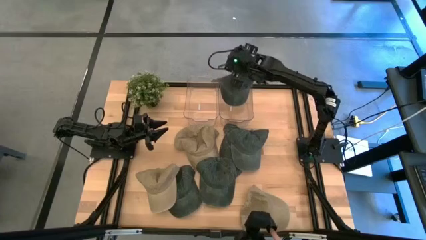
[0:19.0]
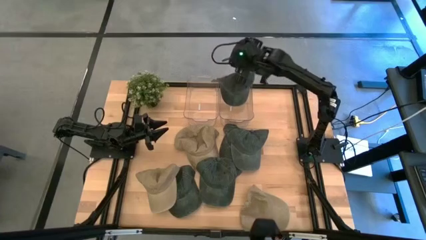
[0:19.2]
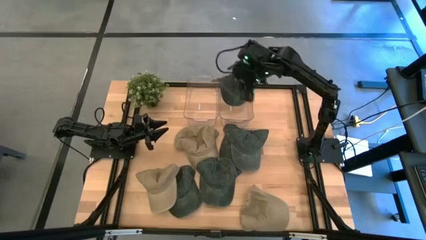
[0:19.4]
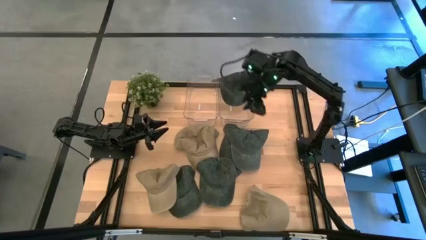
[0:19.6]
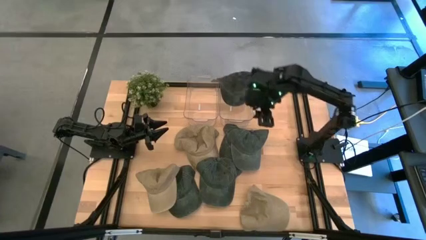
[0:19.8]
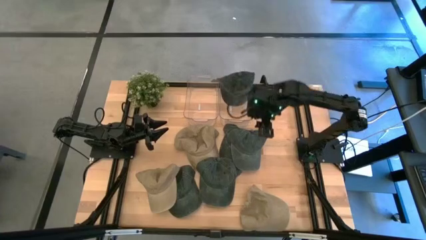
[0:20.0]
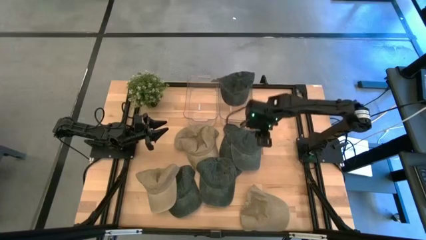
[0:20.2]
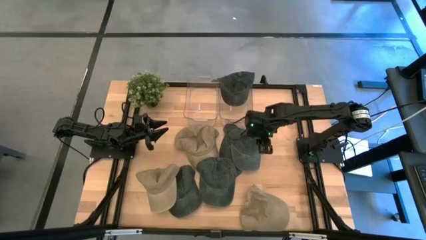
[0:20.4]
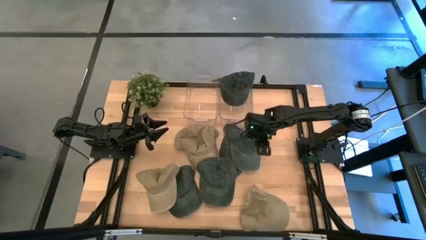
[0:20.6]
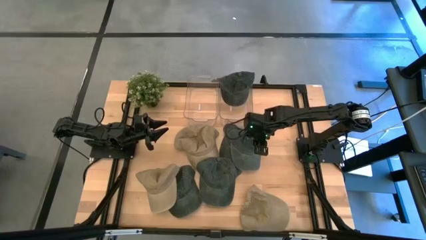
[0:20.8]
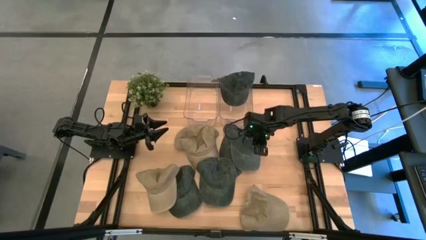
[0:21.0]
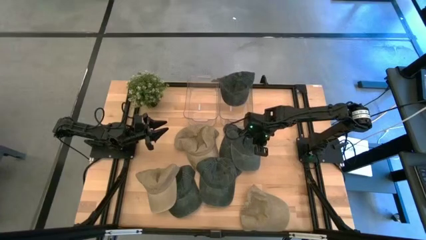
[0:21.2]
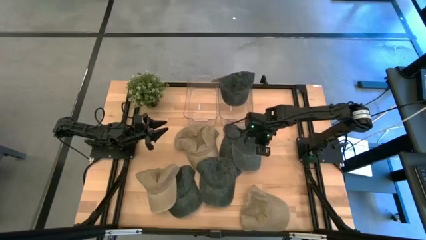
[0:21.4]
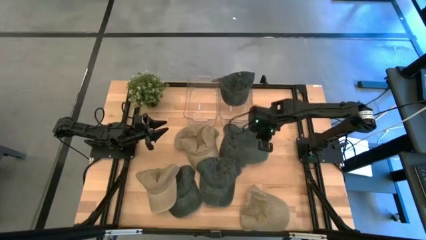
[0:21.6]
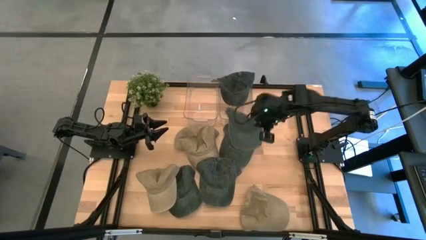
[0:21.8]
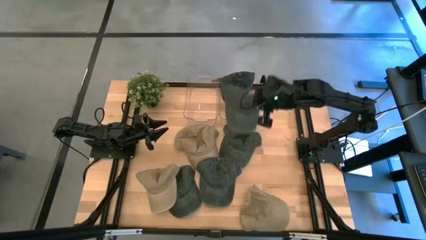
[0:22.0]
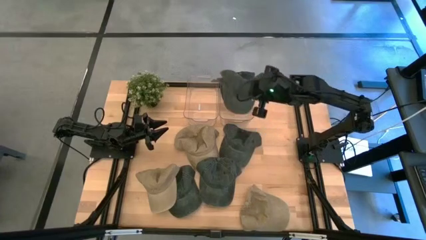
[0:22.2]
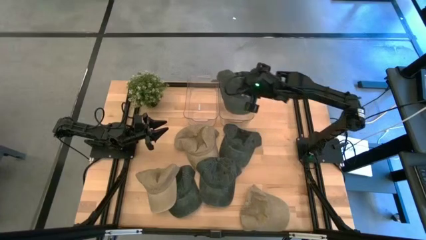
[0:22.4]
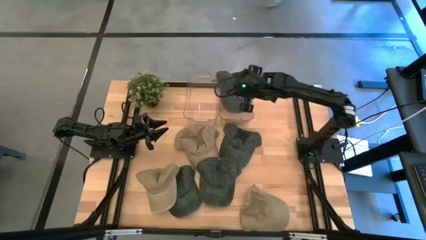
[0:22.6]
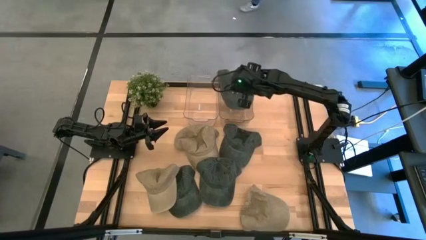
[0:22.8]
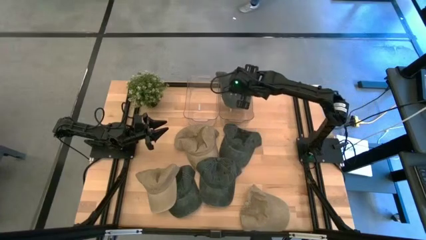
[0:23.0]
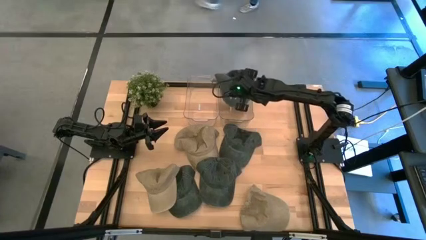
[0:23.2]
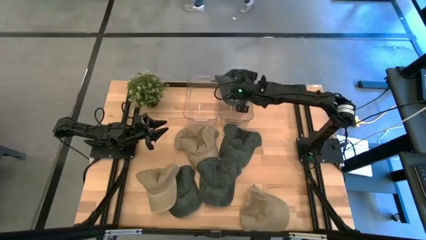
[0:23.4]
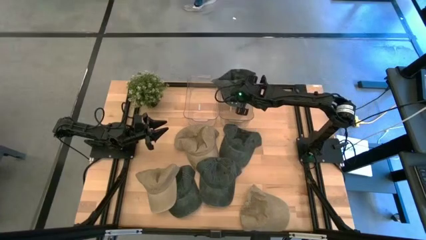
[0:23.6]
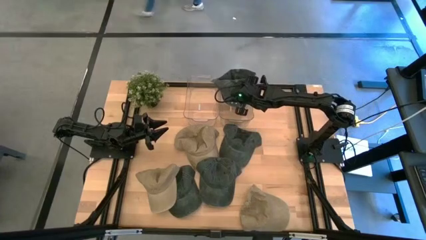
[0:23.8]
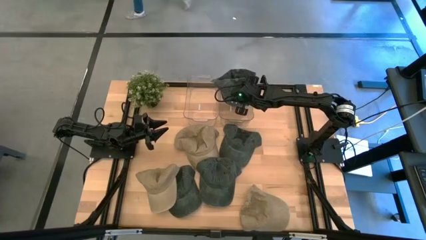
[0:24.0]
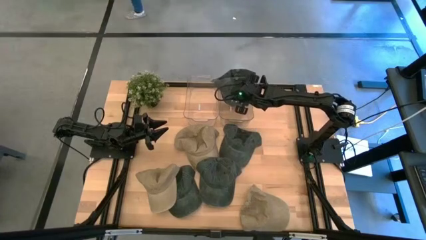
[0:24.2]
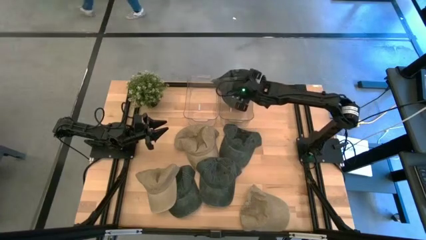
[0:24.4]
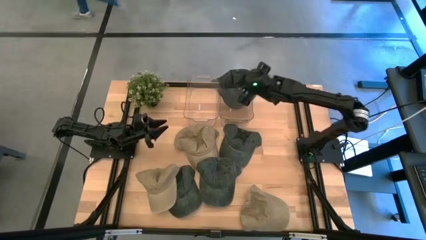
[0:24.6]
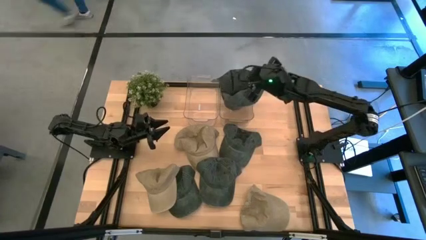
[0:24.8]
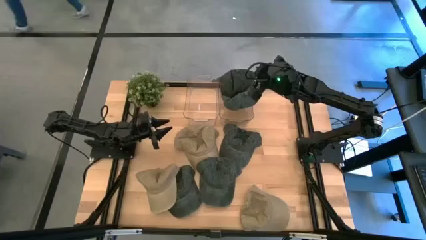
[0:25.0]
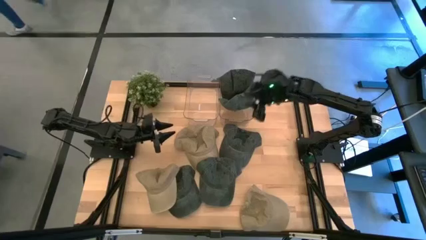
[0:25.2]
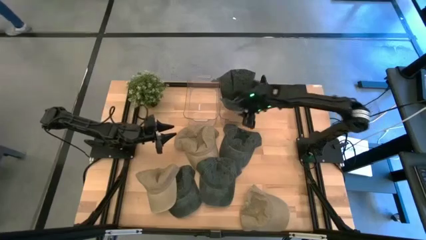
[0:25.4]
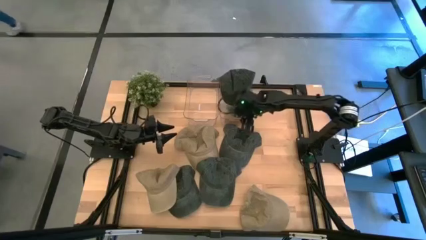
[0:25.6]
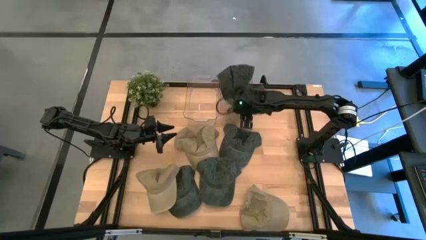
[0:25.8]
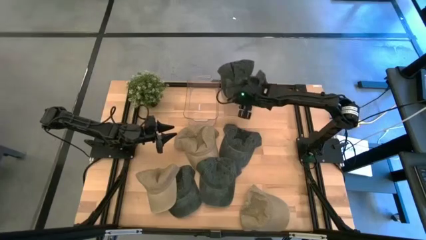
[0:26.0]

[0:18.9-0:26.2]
Task: Pick & Place hat
Put the black cap into the right transparent bin

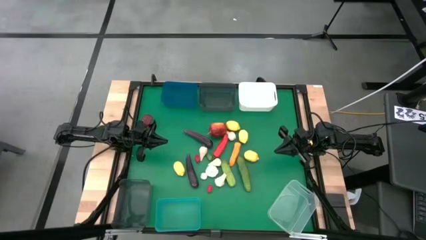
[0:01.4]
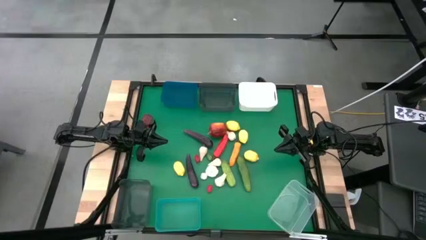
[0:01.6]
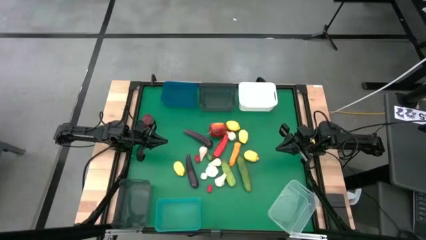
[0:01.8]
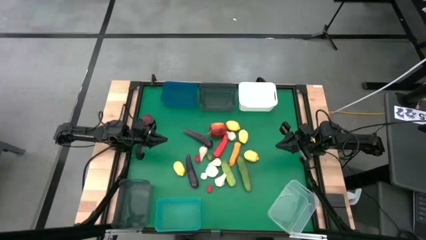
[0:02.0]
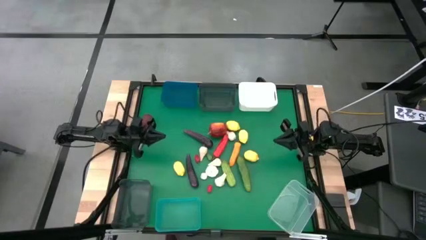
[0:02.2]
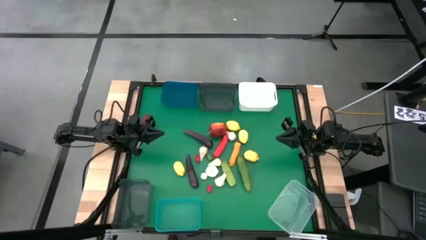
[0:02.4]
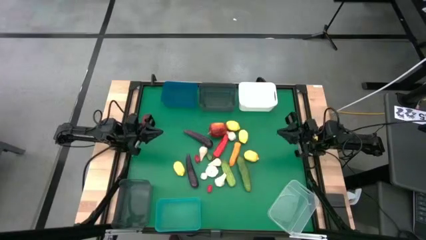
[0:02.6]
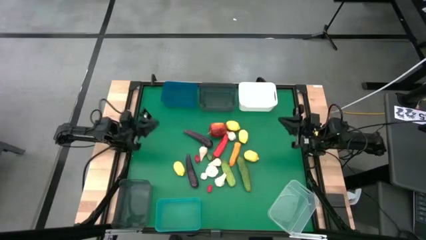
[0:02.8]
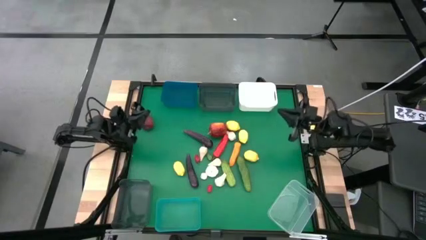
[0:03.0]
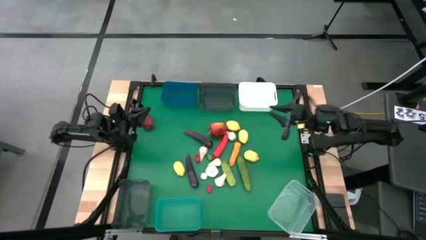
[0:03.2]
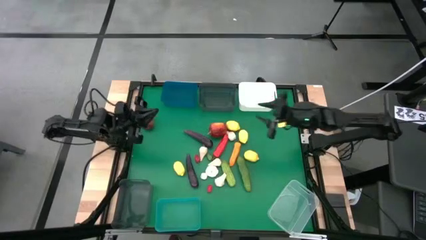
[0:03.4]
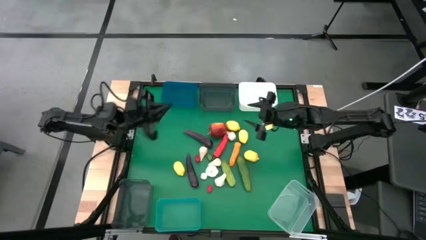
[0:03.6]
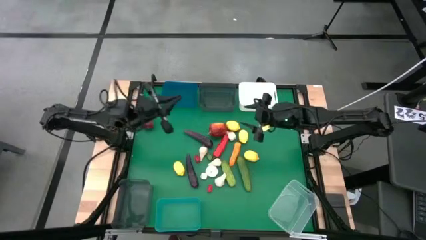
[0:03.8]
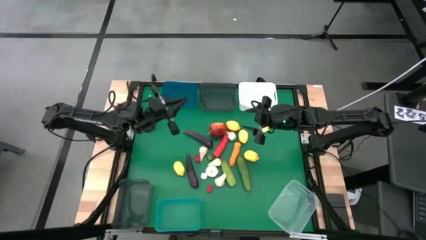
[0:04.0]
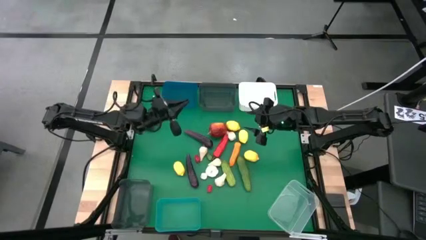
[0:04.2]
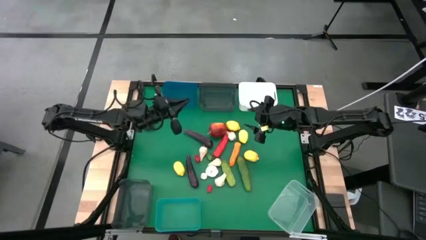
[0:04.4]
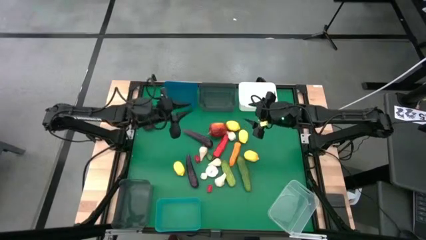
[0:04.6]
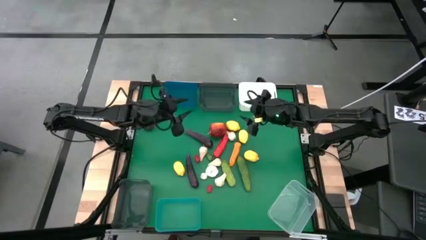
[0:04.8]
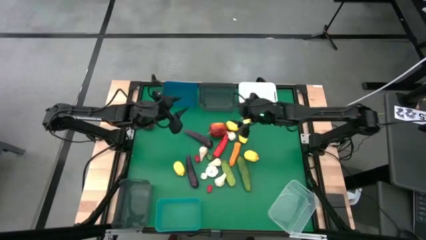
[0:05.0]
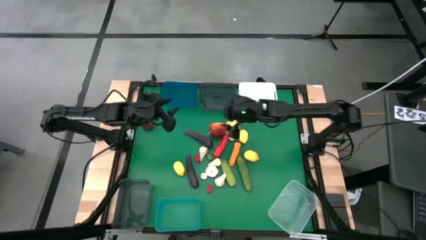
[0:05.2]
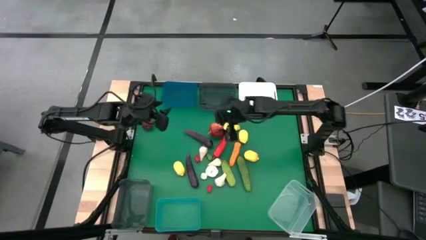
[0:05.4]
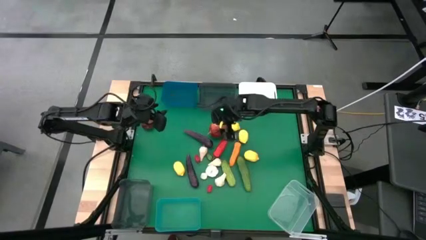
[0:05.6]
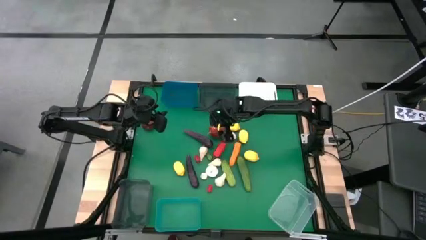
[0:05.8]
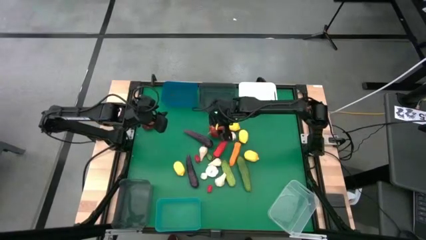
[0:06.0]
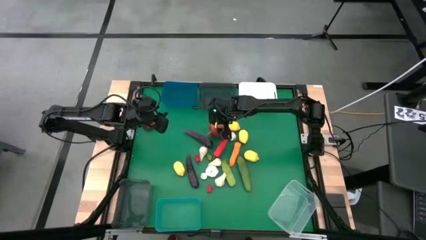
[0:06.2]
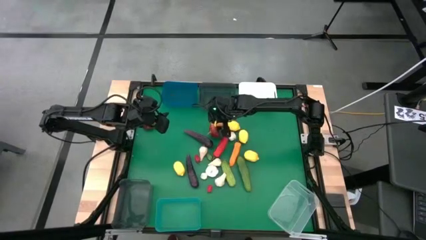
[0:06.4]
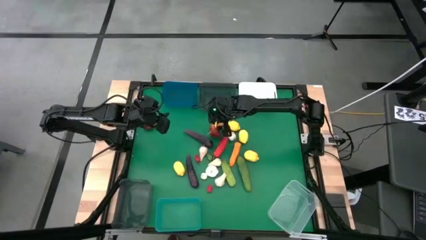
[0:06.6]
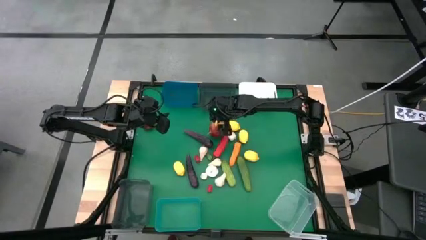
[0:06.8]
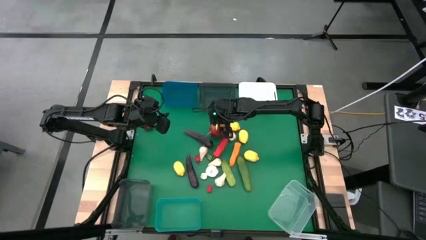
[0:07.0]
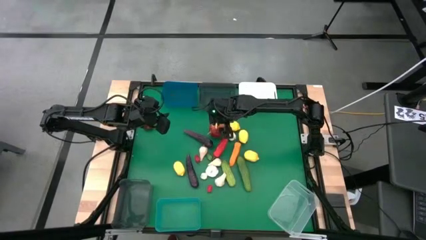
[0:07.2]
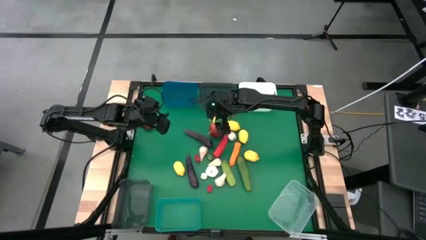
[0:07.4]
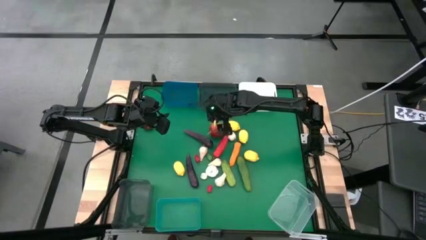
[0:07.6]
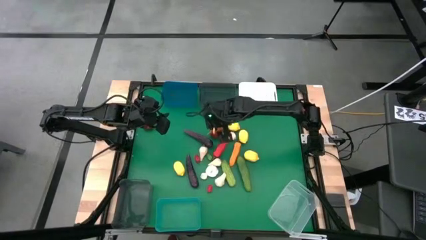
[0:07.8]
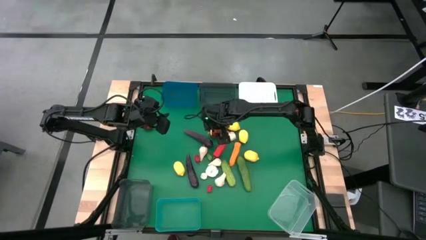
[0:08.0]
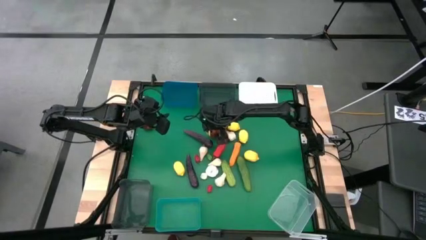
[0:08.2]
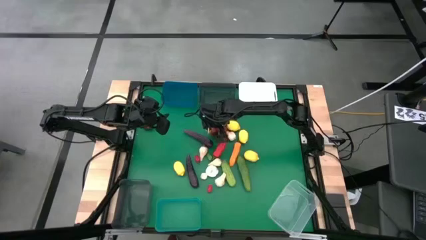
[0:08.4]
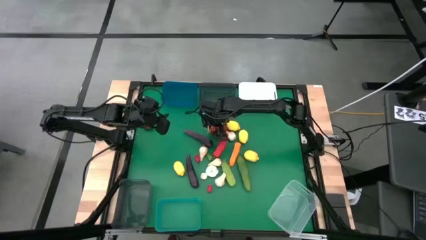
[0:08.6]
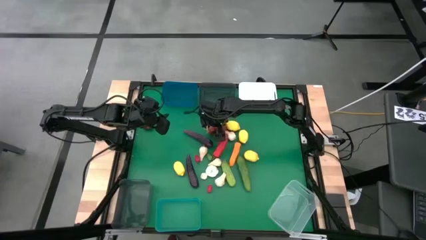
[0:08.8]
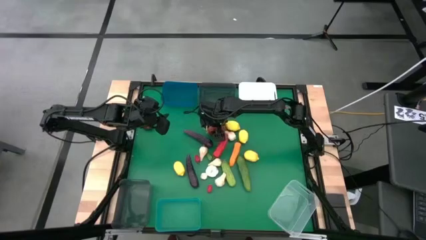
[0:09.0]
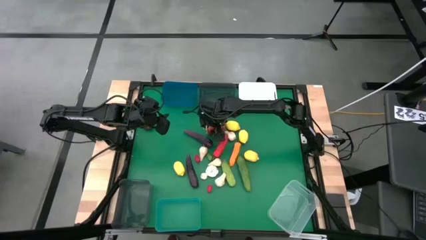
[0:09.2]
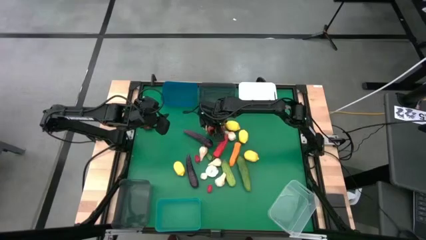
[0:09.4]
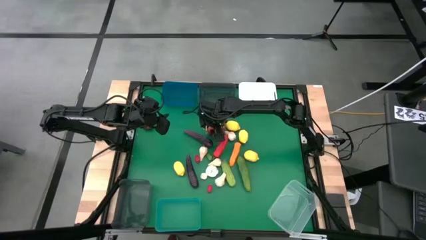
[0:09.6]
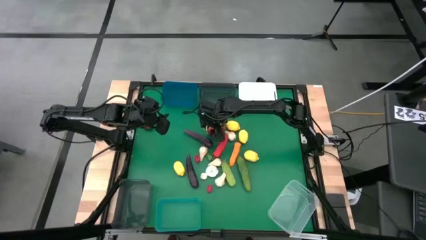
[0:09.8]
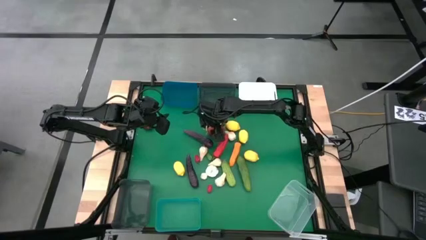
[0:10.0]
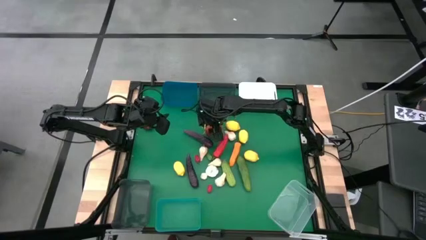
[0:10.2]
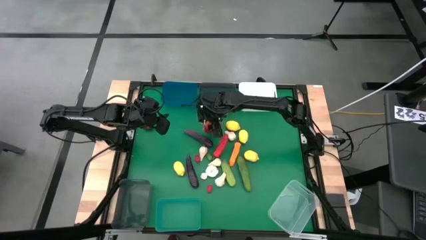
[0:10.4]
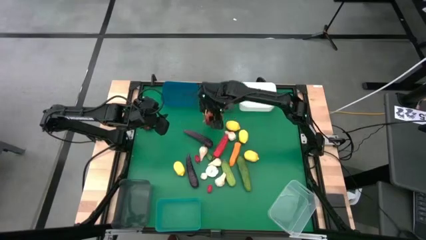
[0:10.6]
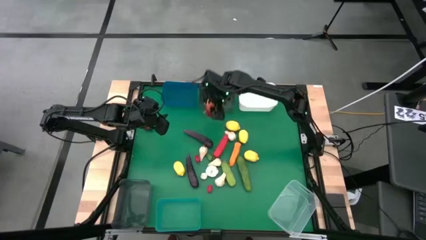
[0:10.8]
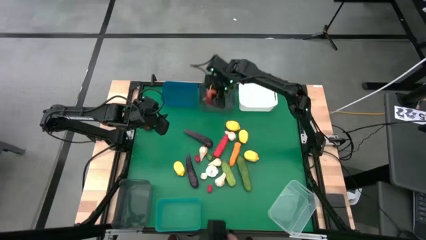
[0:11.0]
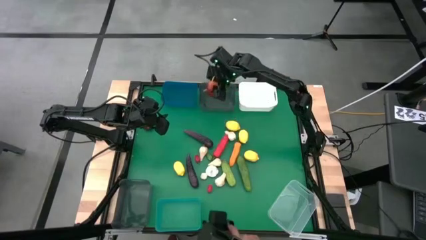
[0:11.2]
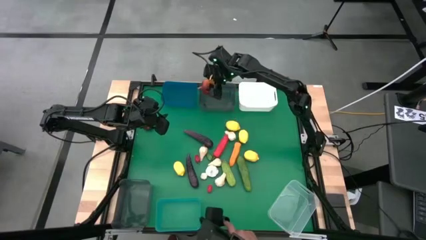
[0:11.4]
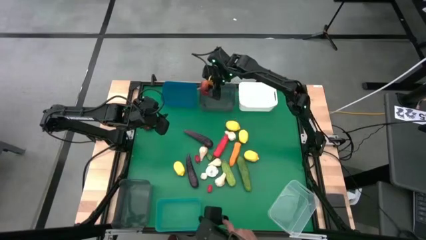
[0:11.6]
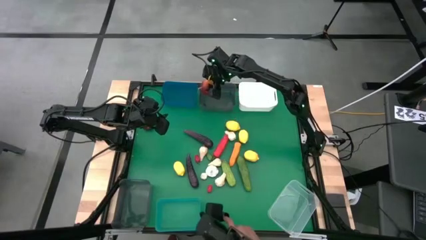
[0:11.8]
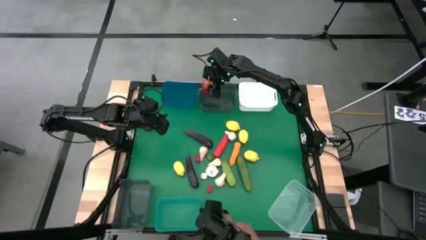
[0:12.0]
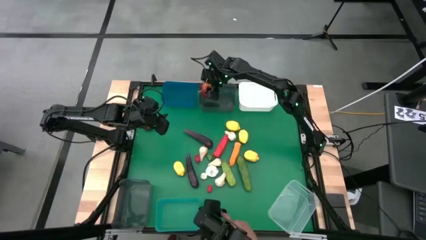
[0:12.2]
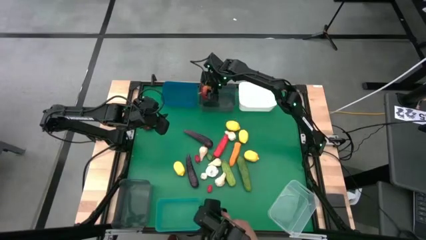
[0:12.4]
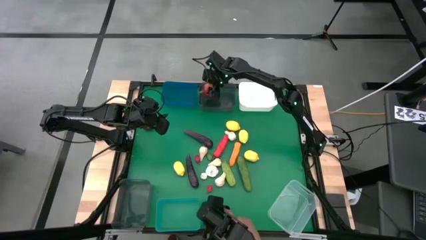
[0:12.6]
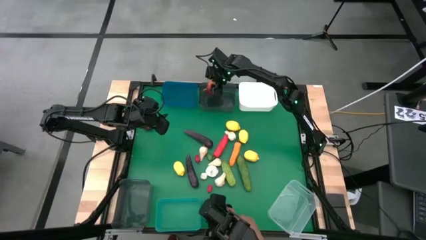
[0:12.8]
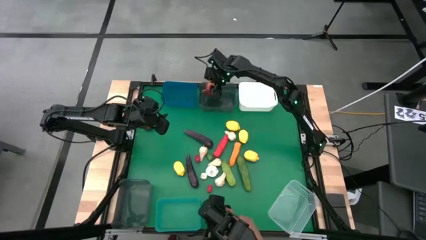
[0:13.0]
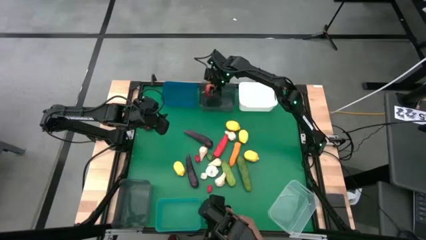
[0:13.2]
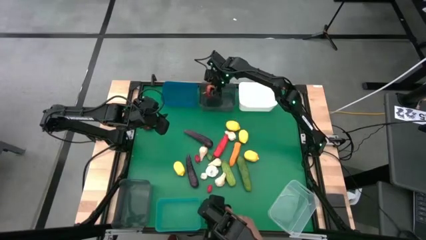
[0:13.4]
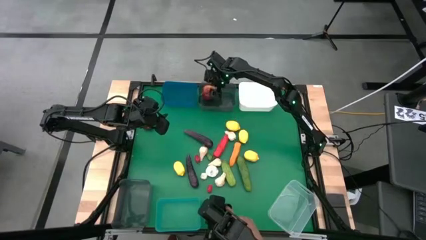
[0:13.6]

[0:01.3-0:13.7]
Task: Sort produce into baskets
Put the red apple into the top black bin
